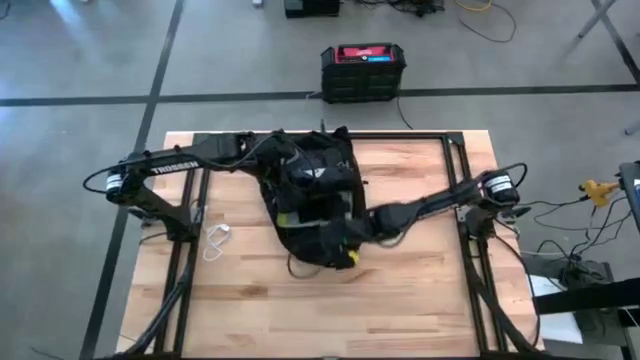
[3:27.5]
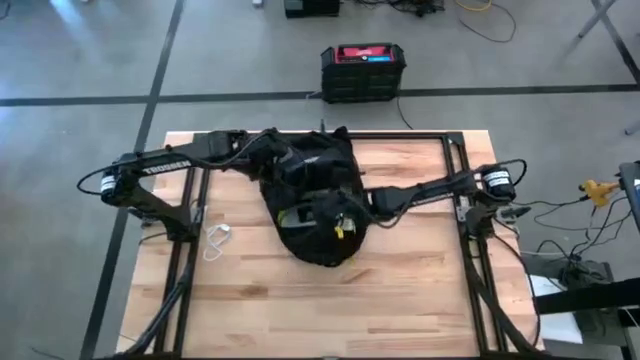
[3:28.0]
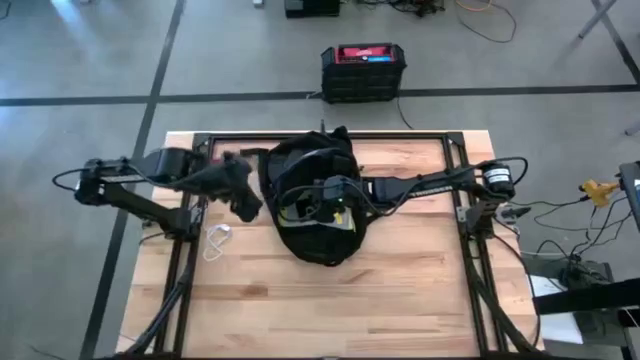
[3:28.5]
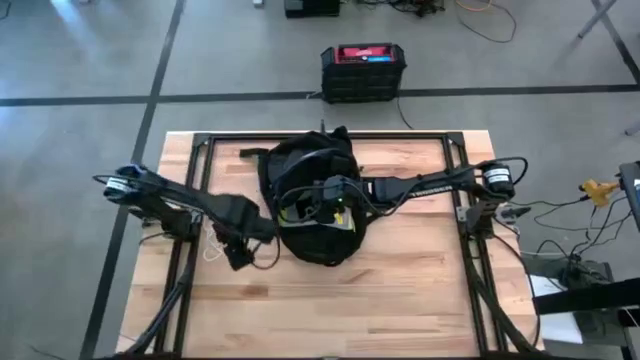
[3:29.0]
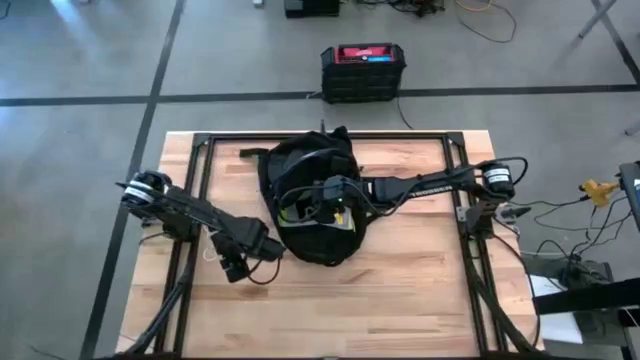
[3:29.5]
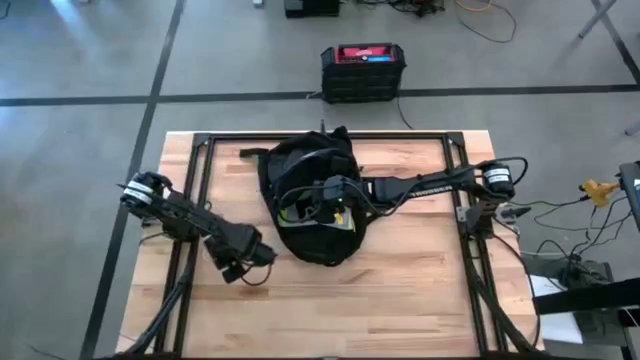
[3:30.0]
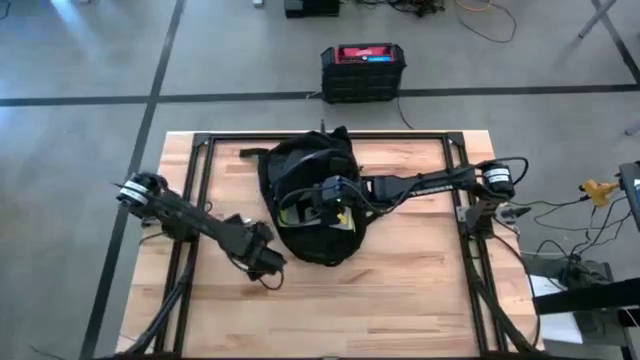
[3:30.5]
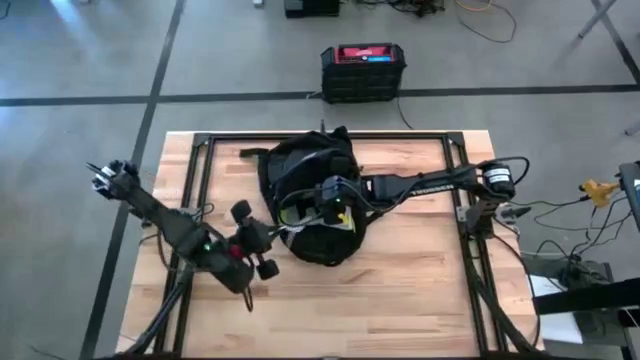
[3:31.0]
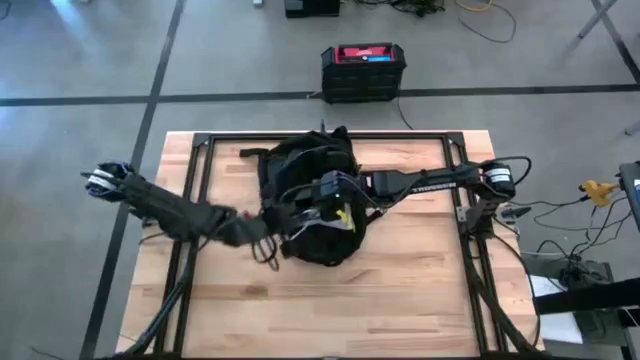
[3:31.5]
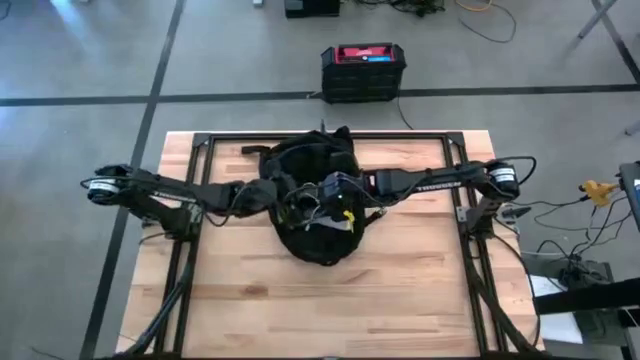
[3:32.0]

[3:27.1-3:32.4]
Task: Unpack backpack
Put the white charger cable into the black backpack

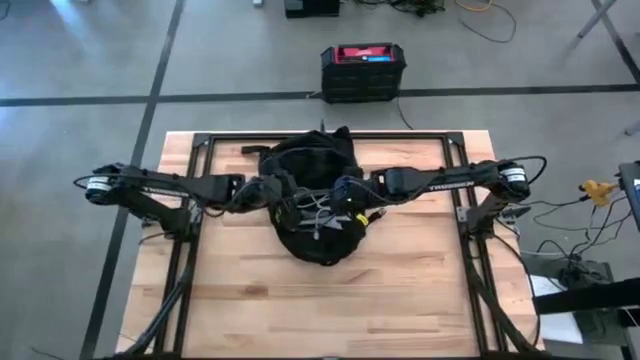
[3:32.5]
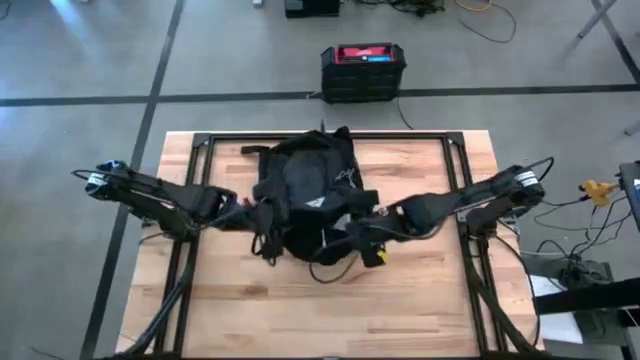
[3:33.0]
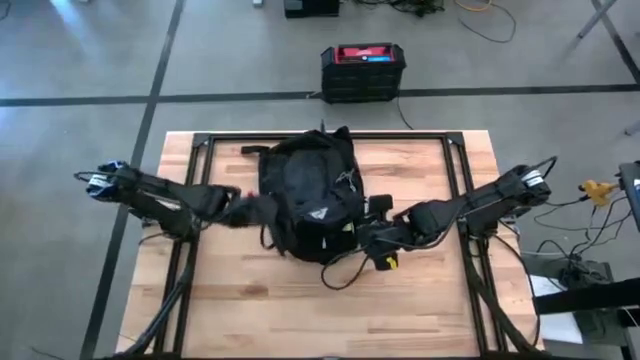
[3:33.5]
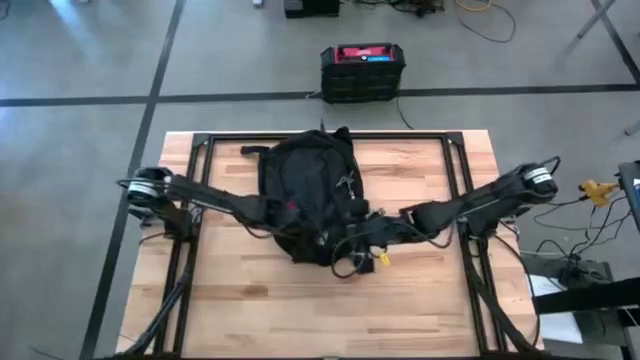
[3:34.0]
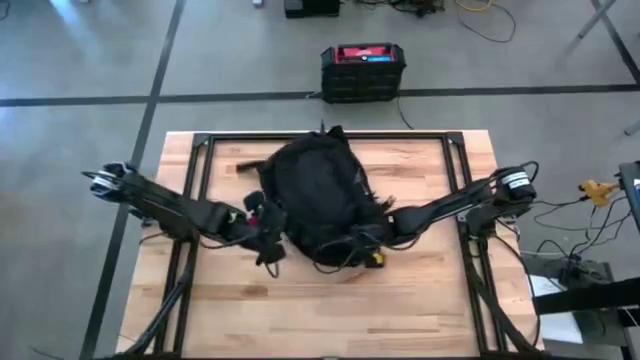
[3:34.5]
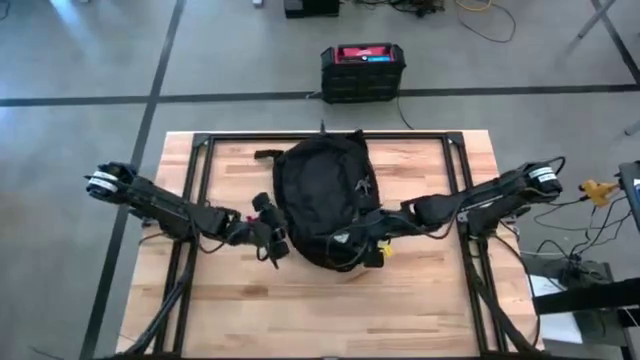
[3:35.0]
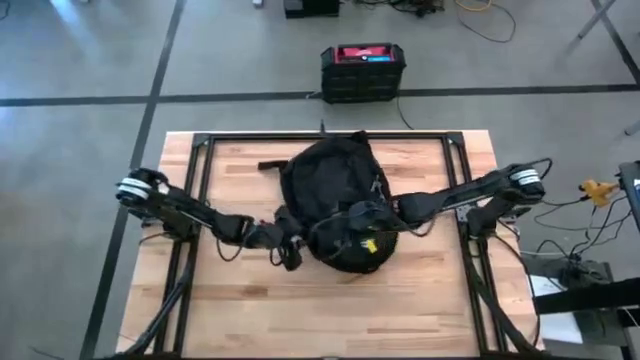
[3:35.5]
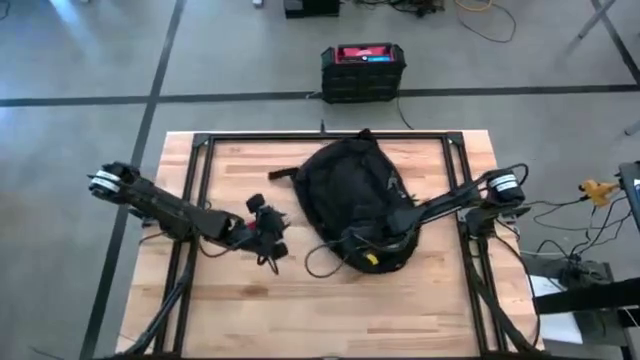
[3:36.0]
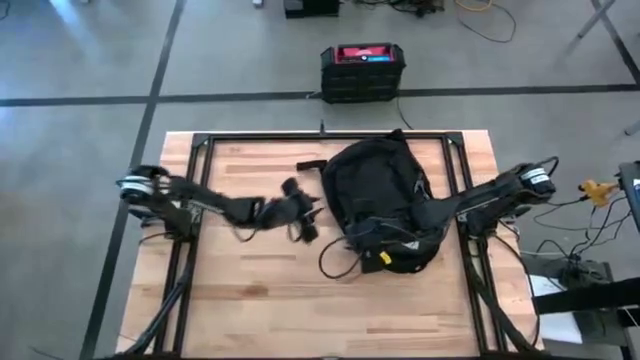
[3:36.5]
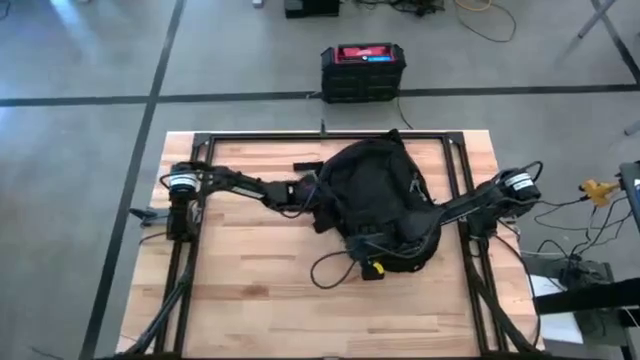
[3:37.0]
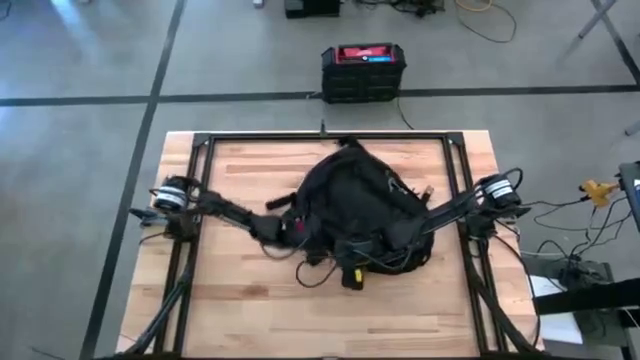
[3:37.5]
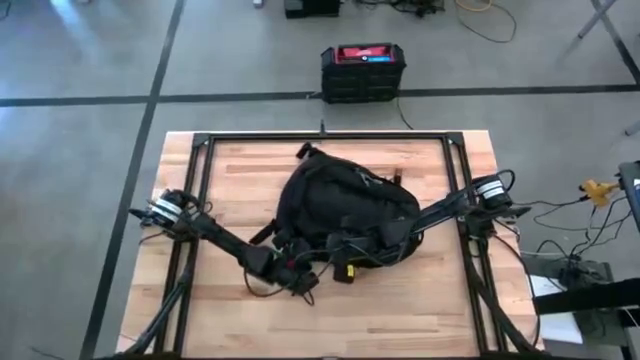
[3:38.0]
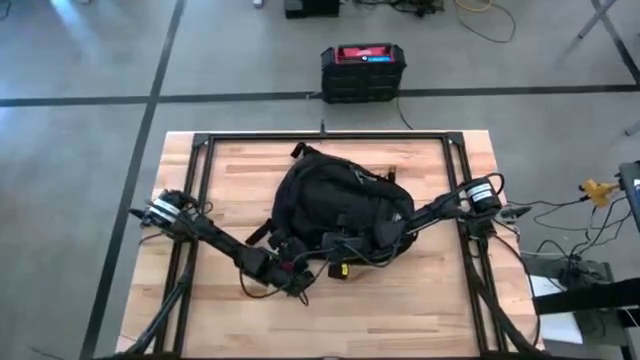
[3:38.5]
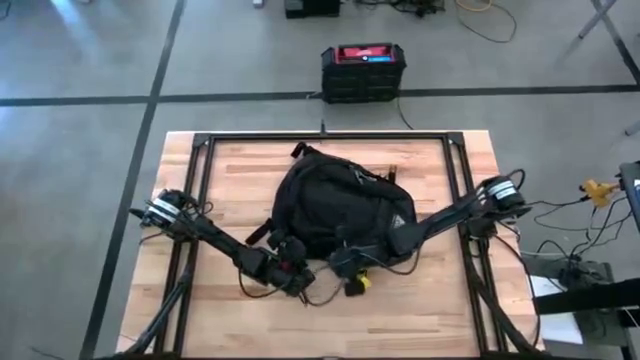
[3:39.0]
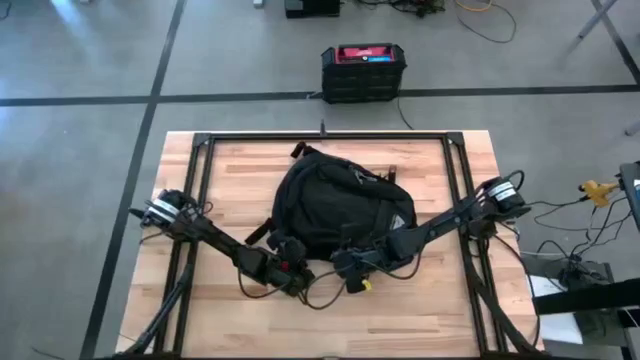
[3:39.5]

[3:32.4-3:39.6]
Close the black backpack

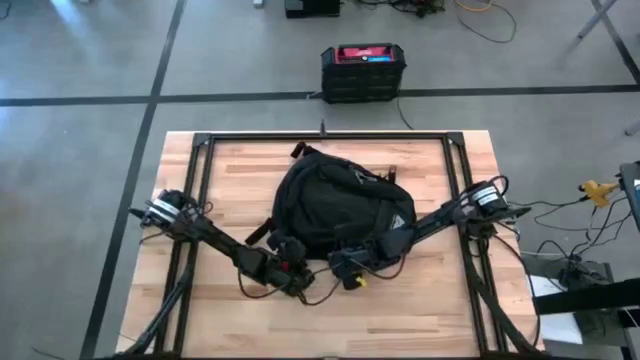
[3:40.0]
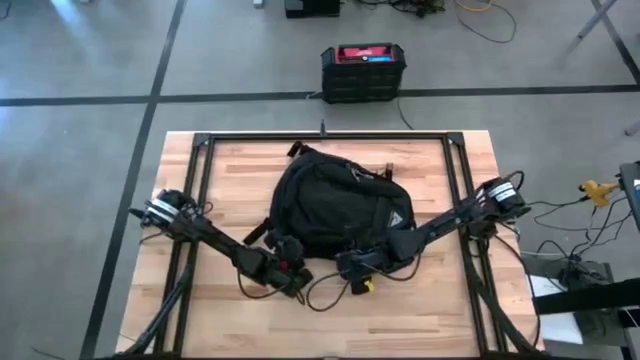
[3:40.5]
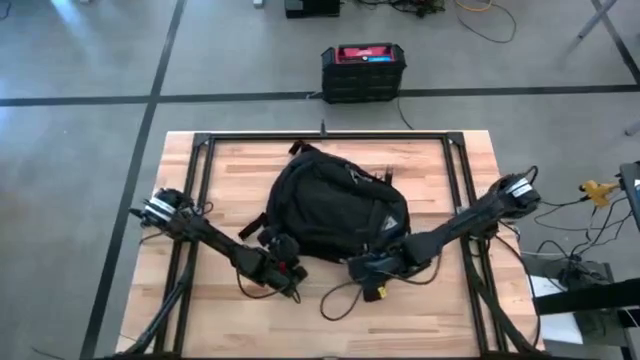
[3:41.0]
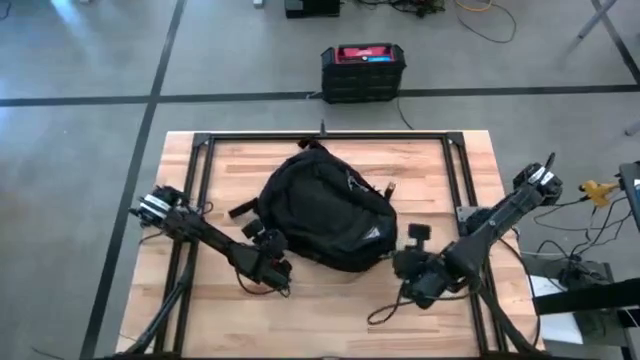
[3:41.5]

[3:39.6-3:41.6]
Close the black backpack

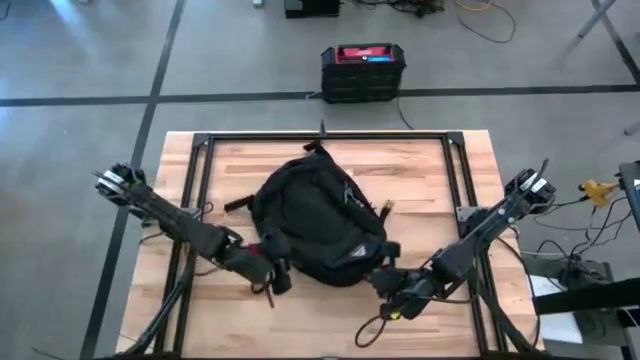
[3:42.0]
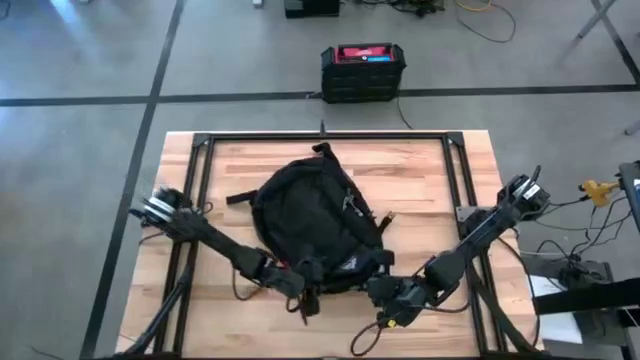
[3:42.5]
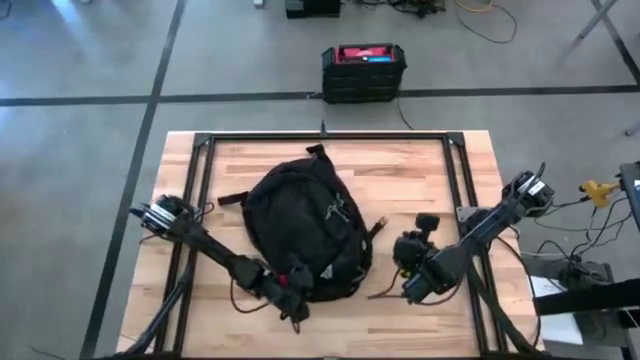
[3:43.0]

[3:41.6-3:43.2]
Close the black backpack

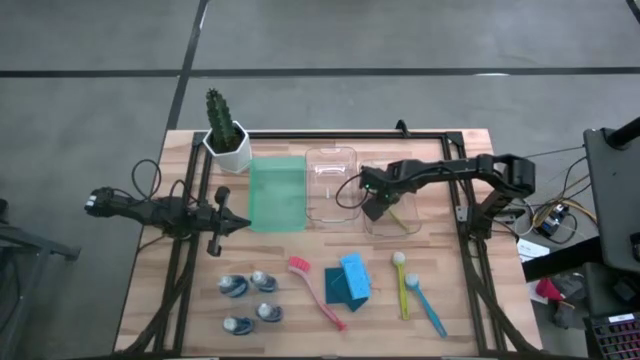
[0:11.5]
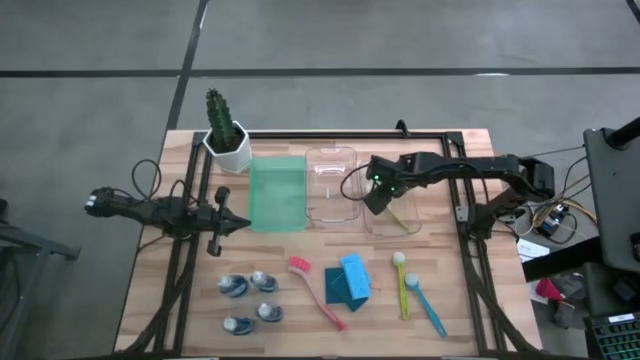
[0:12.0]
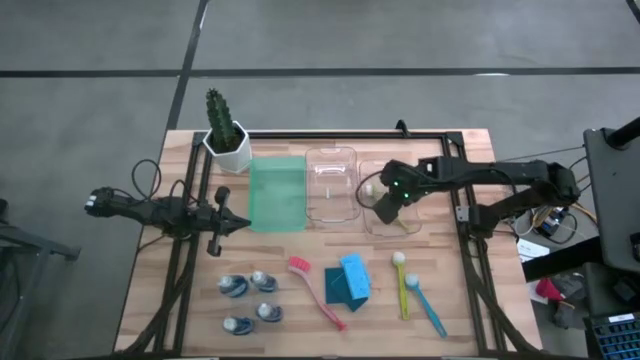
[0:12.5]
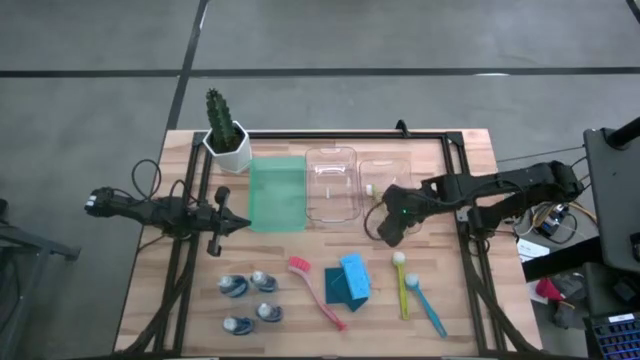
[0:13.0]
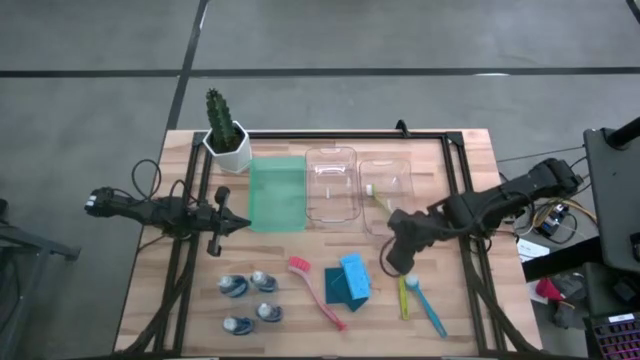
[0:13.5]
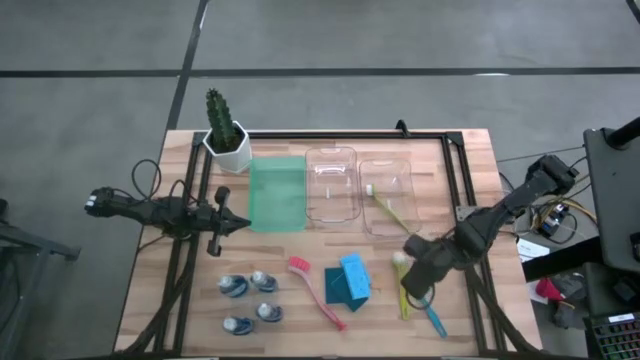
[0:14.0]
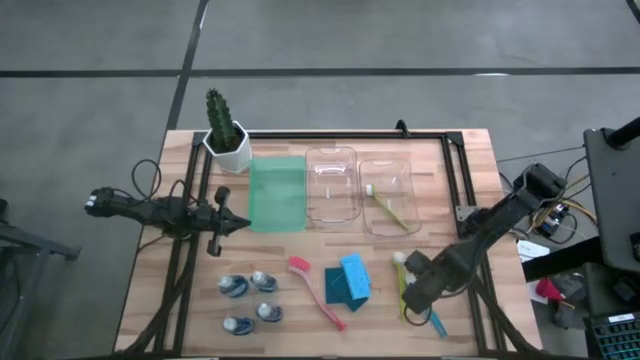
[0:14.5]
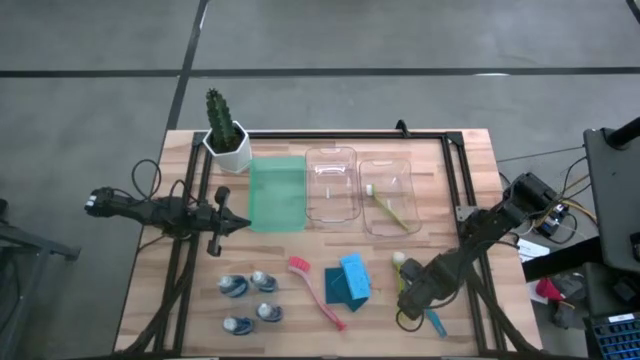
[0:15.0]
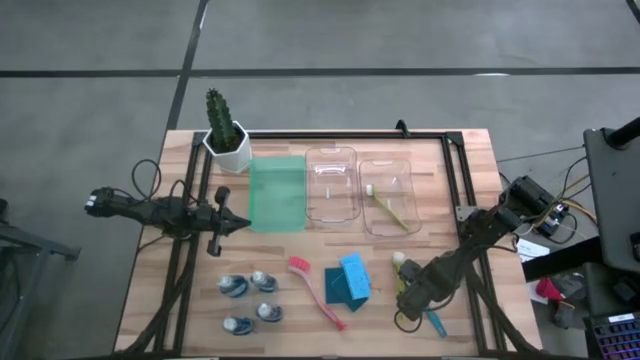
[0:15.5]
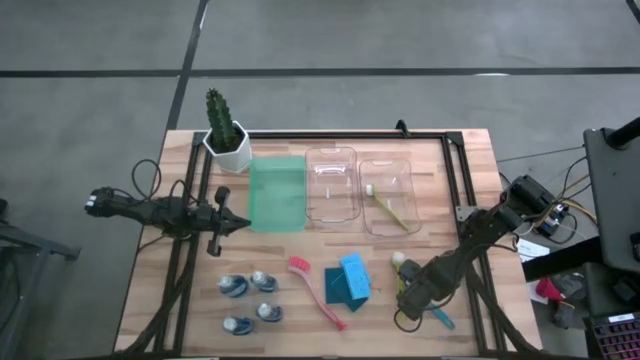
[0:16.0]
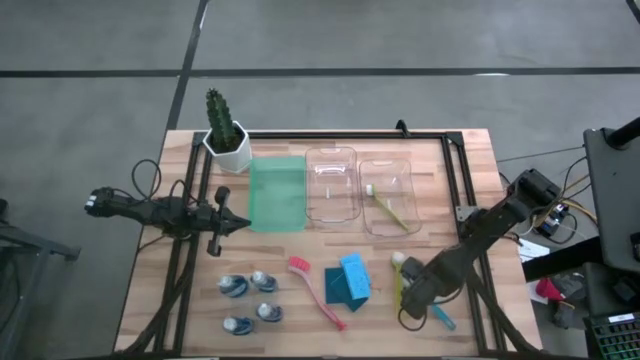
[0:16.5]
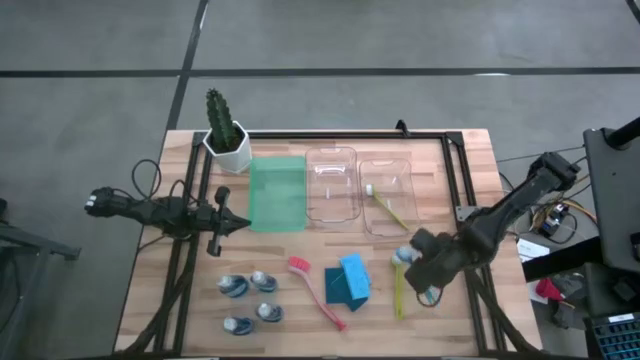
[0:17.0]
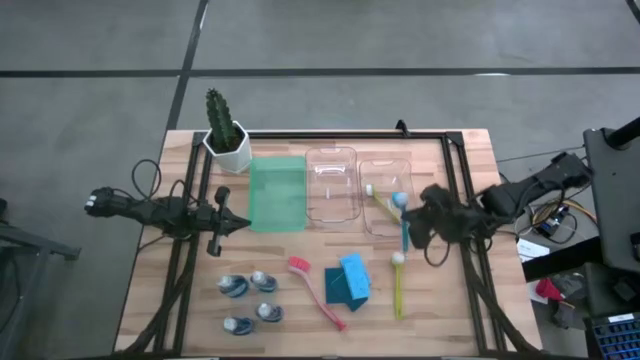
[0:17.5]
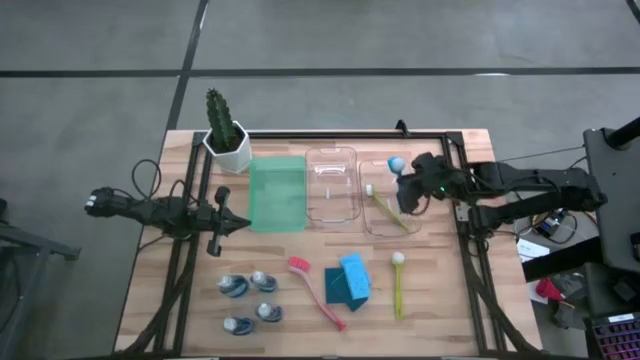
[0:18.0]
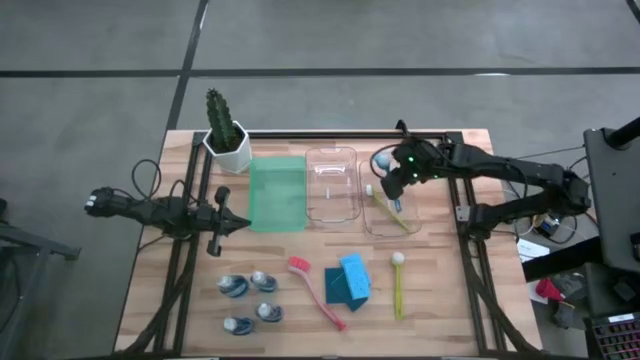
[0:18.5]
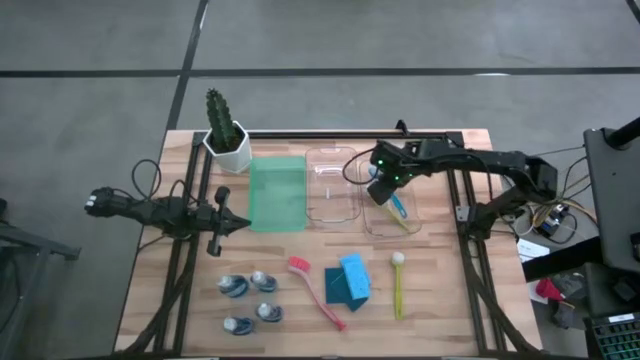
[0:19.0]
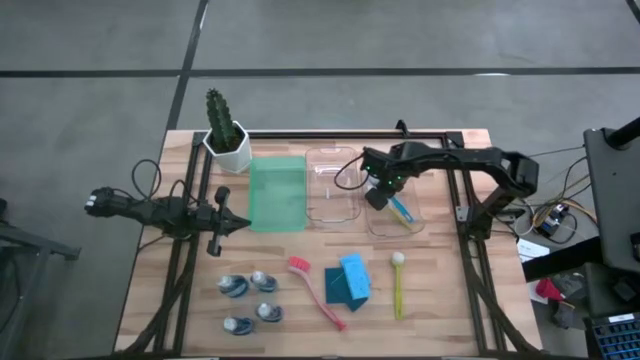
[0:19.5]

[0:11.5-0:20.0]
Task: Pick & Place Kitchen Sink Supplies
Put the blue dish brush into the right transparent bin
